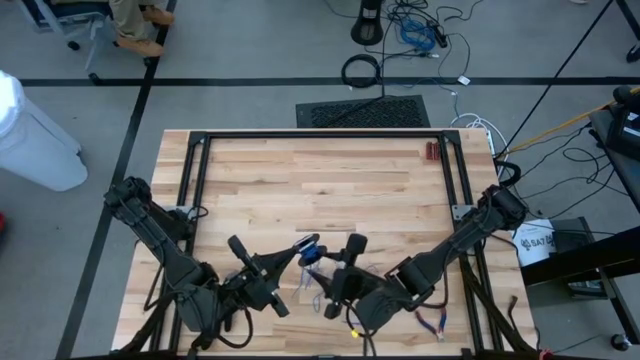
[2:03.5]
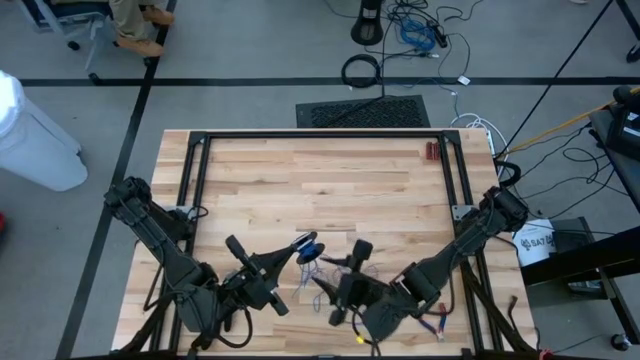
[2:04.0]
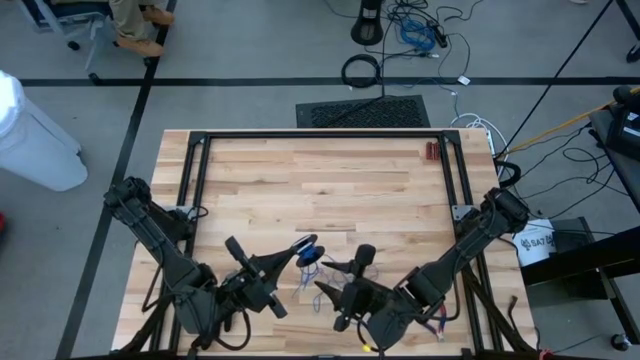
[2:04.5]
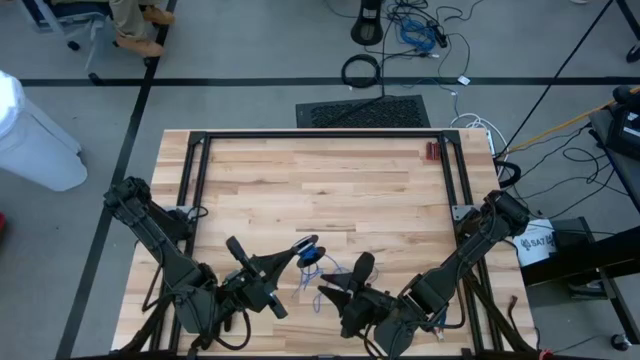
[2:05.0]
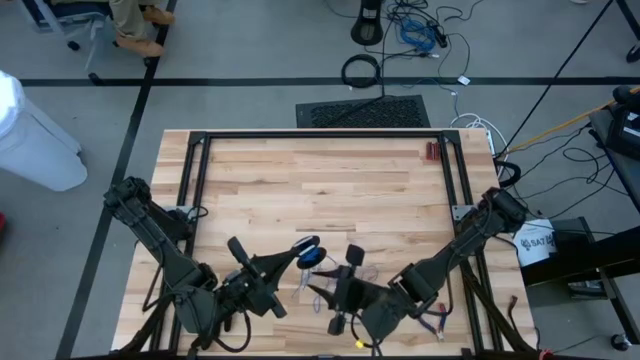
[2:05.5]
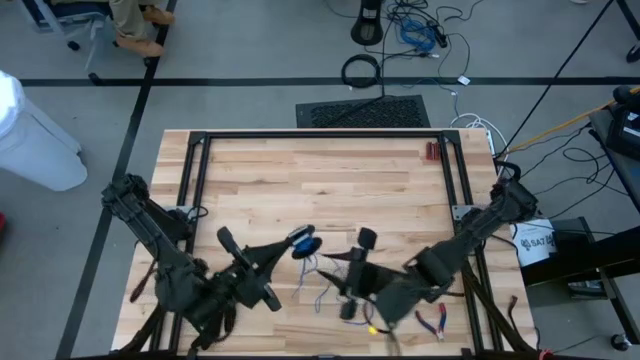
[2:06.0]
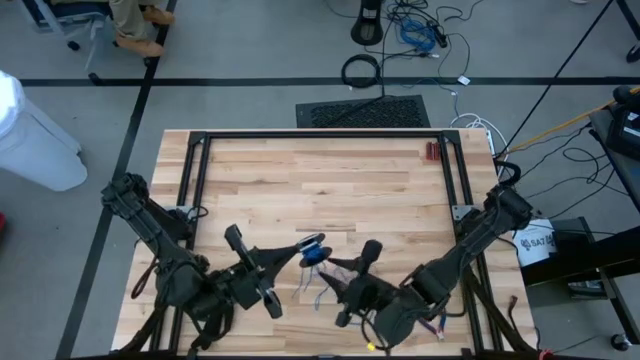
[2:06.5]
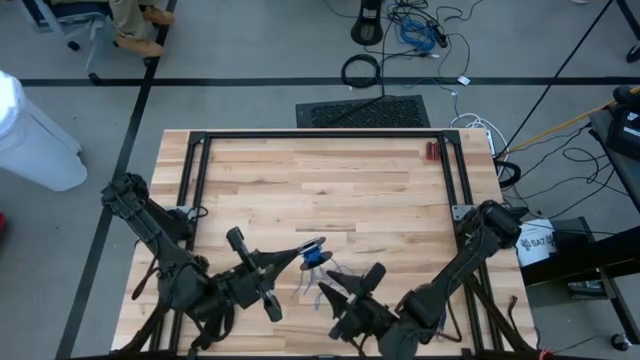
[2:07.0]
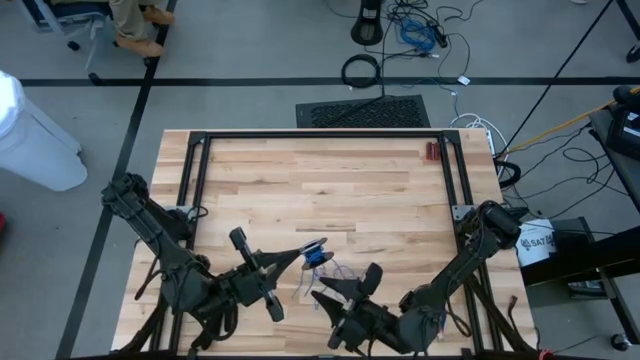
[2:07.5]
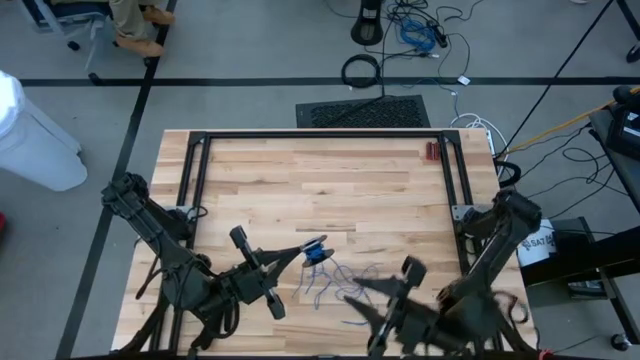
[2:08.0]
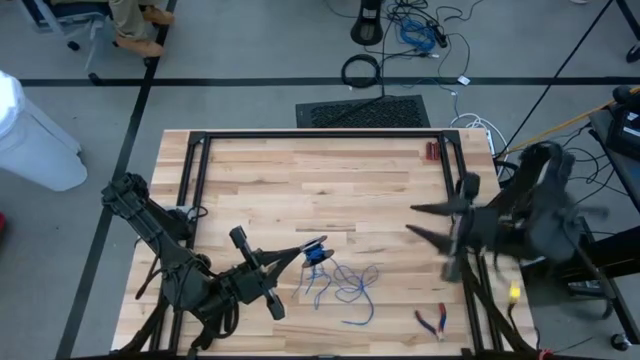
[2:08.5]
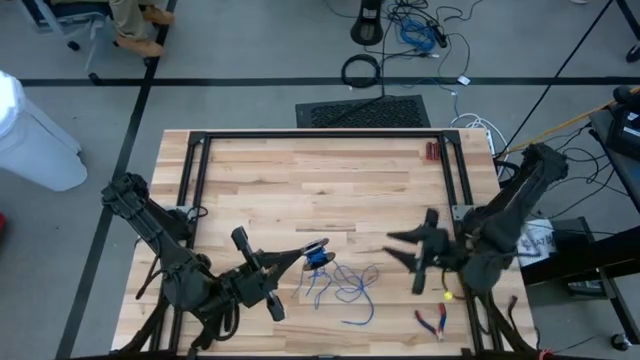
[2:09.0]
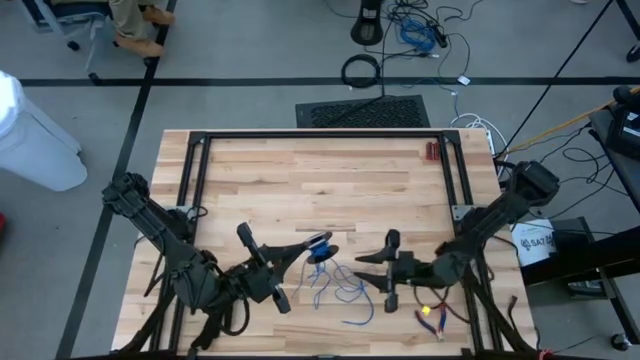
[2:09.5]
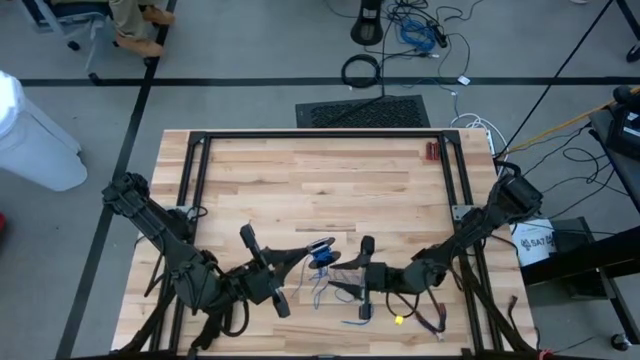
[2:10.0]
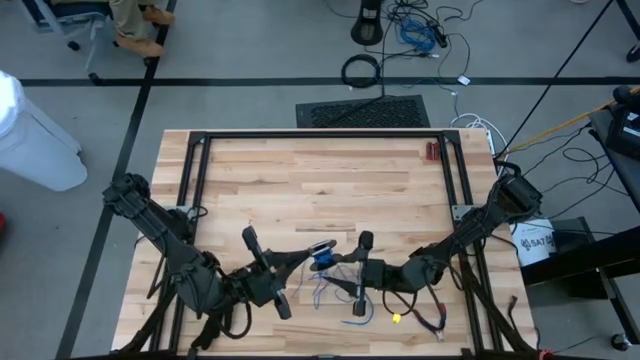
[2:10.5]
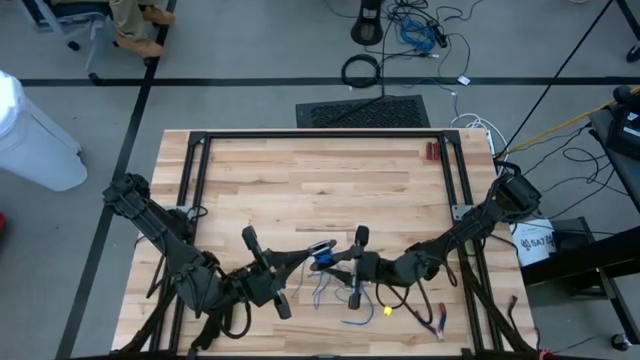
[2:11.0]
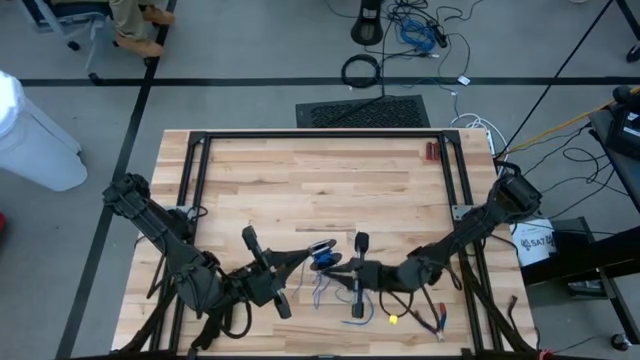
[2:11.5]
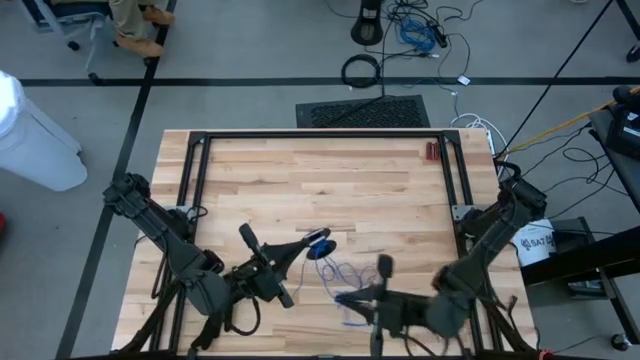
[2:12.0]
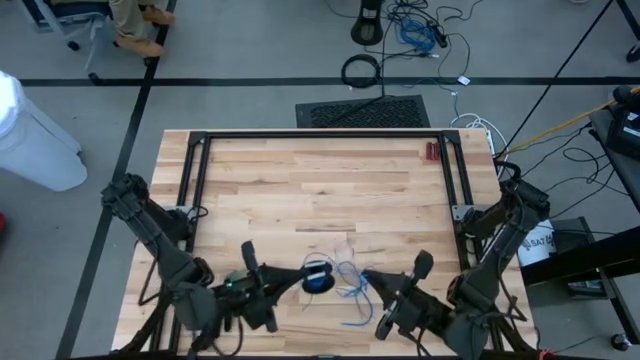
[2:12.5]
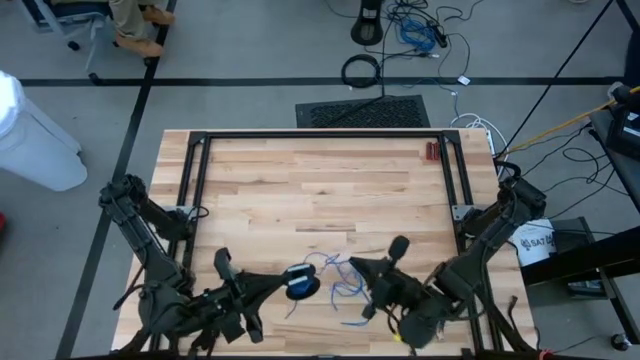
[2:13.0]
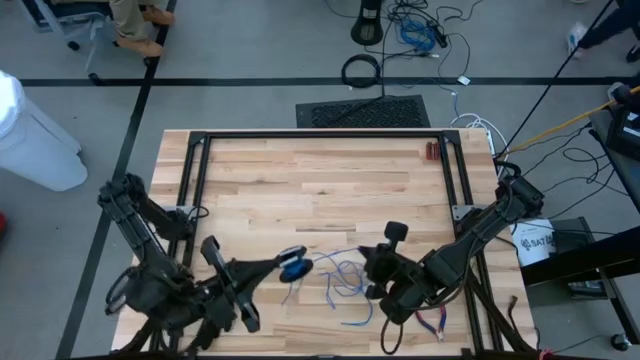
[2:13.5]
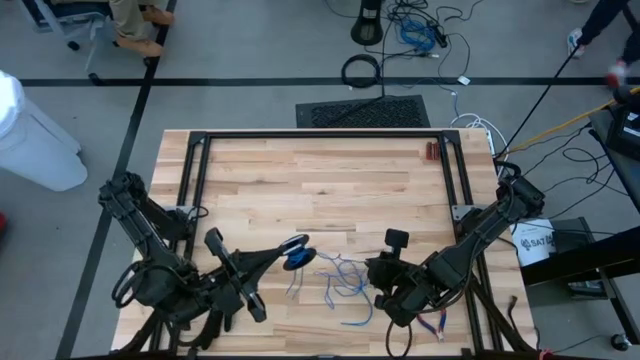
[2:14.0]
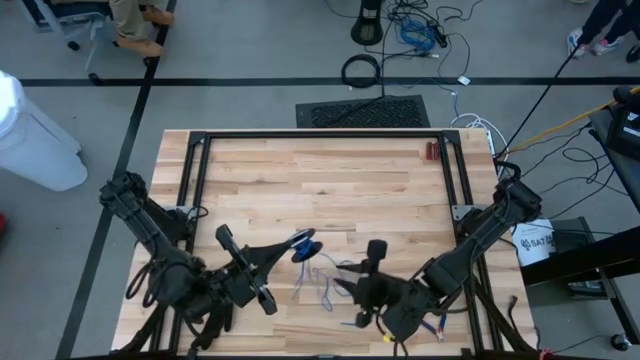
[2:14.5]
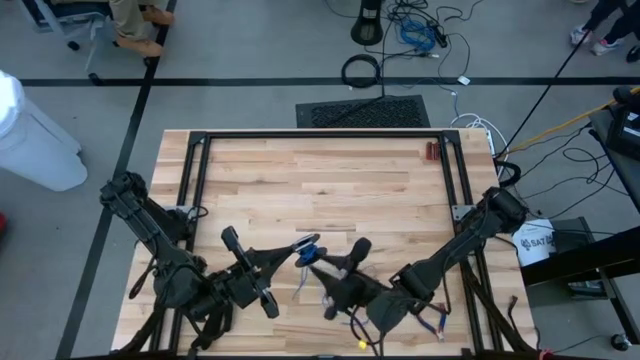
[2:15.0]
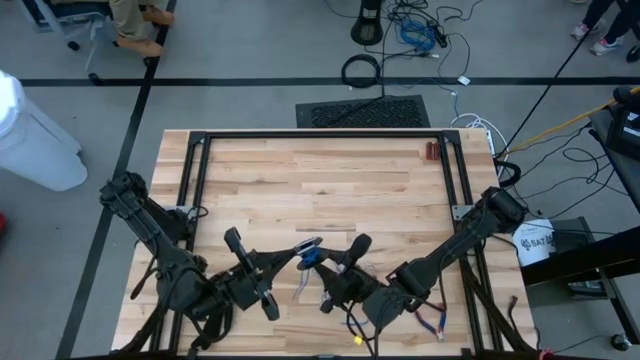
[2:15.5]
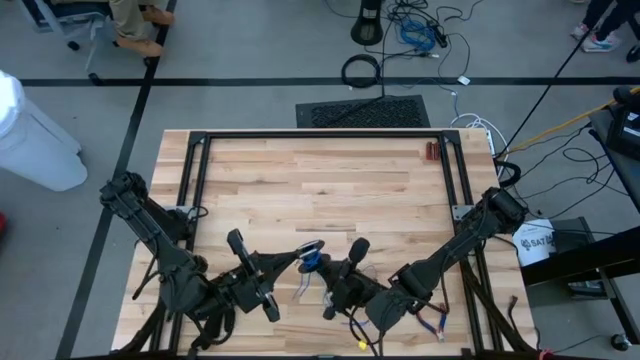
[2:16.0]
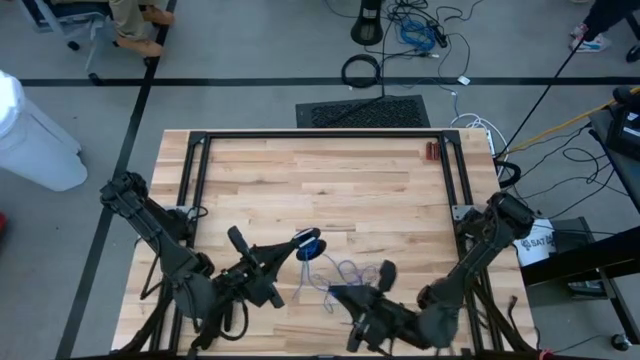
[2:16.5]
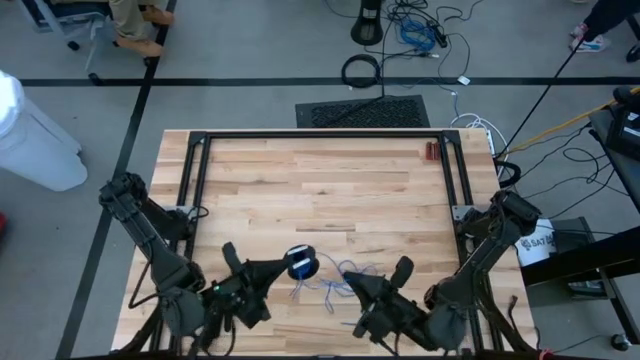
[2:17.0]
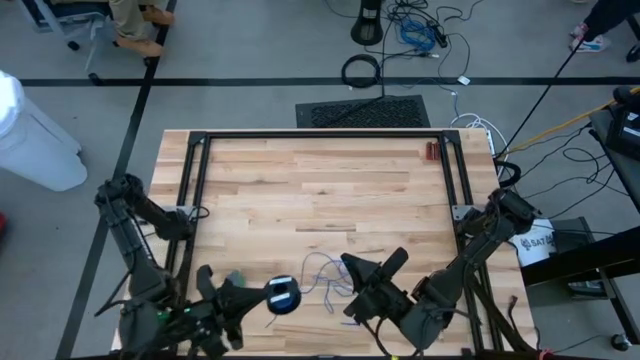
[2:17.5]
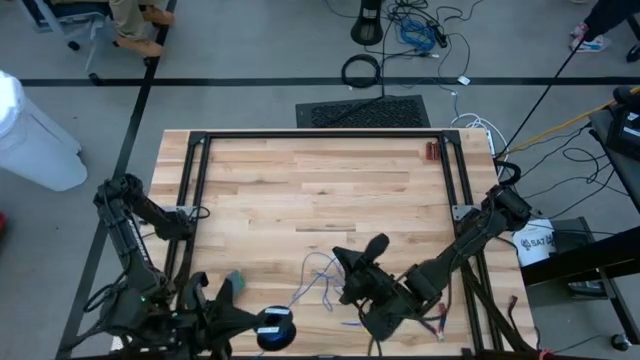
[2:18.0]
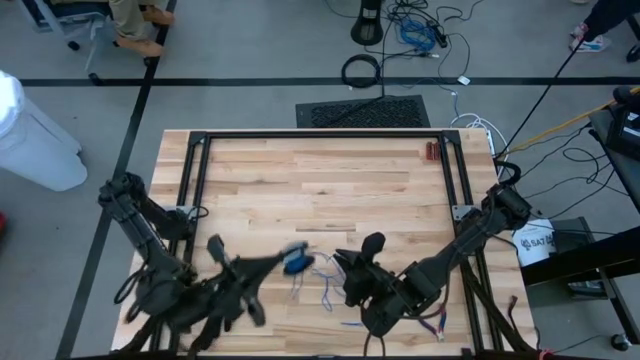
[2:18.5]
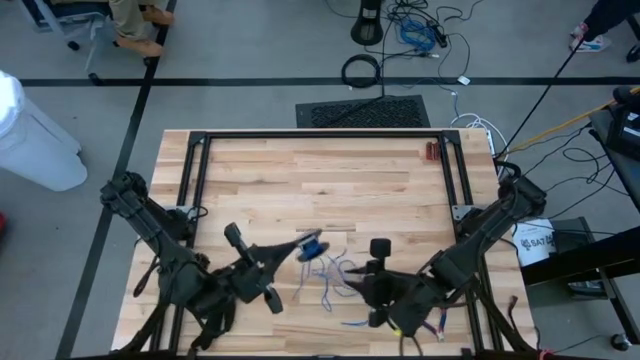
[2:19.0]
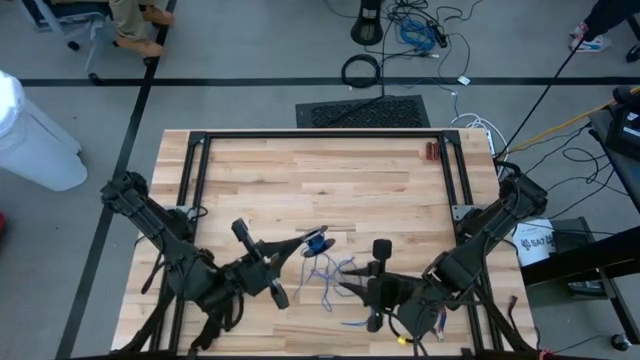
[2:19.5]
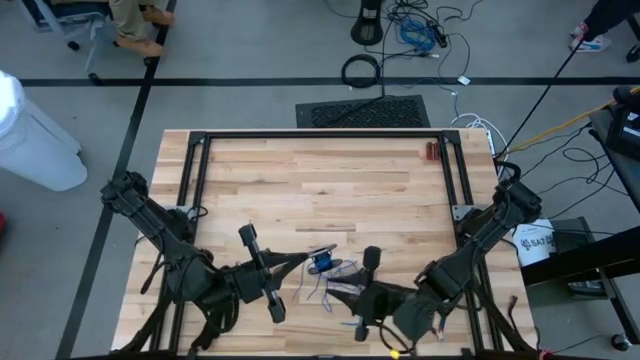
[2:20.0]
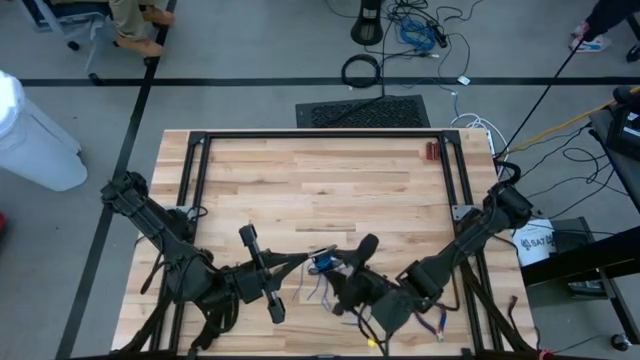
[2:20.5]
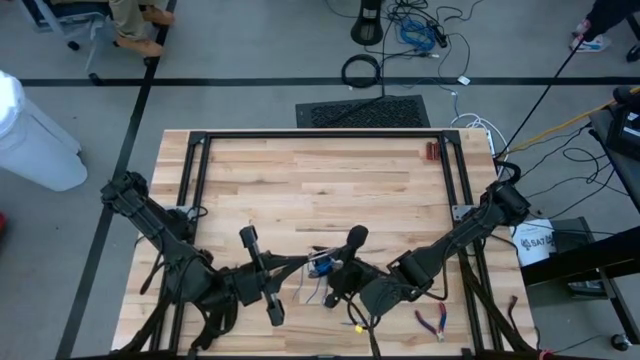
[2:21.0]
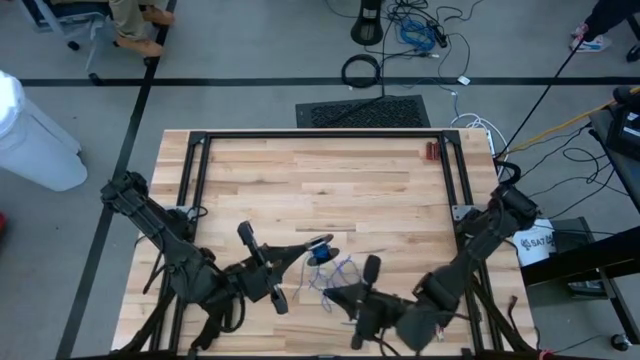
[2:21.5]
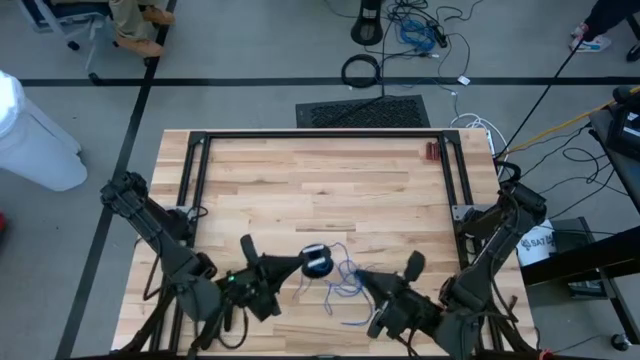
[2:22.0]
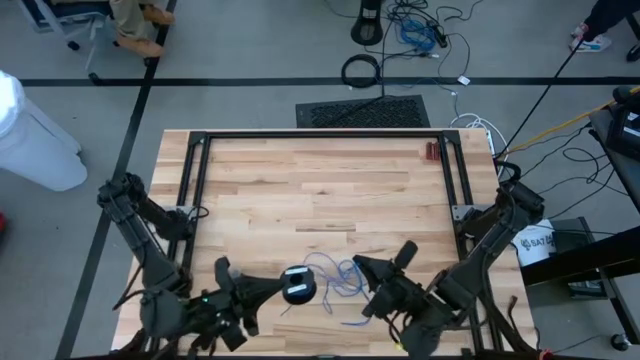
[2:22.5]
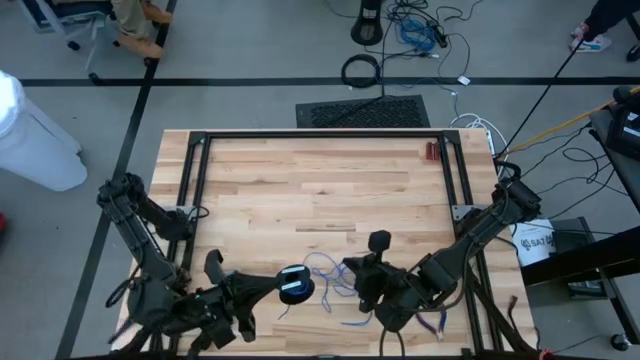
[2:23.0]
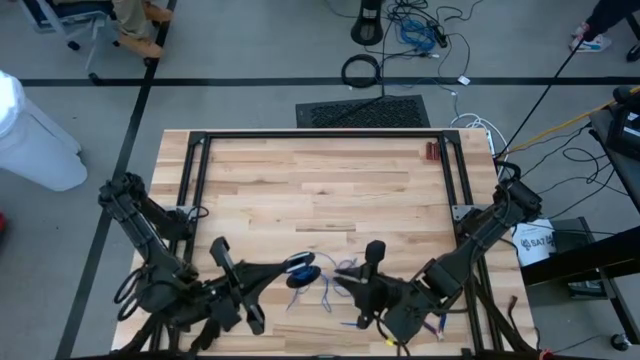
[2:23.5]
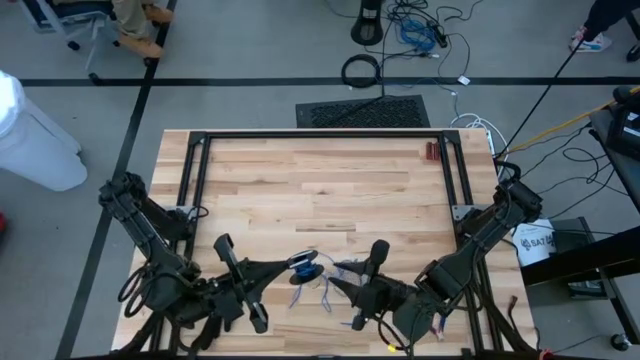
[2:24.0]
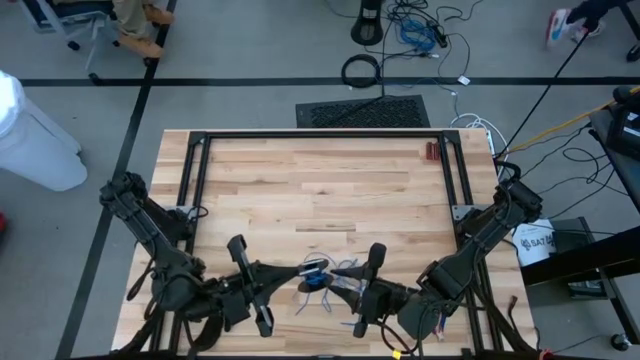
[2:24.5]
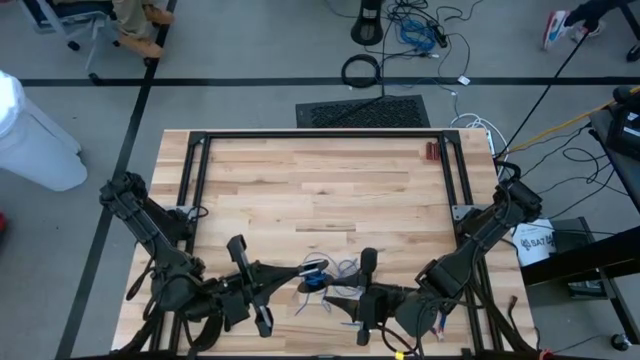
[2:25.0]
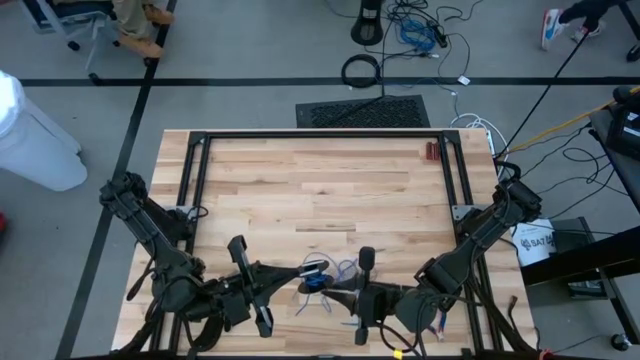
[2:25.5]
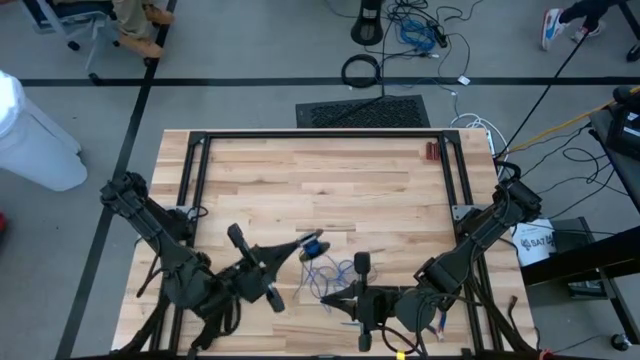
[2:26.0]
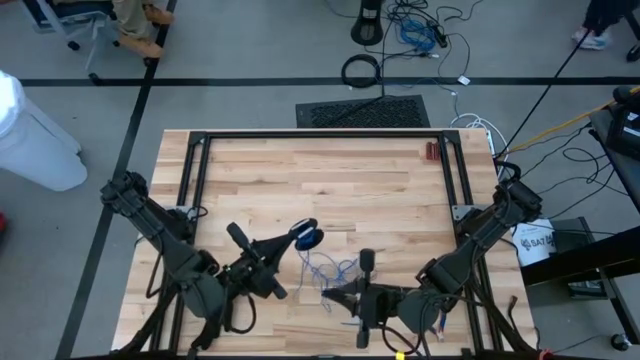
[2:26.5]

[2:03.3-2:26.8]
Task: Coil cords
Uncoil the blue wire from the black spool
